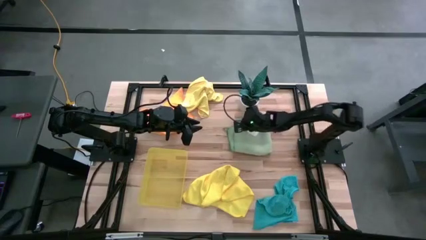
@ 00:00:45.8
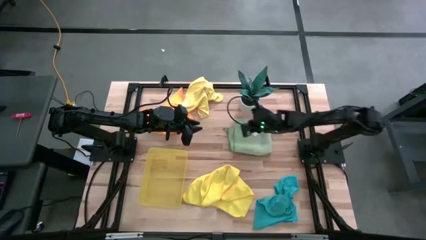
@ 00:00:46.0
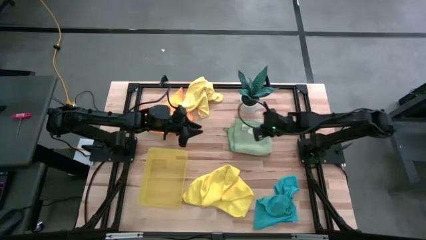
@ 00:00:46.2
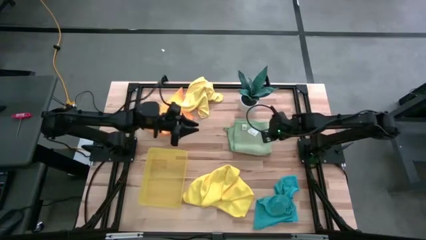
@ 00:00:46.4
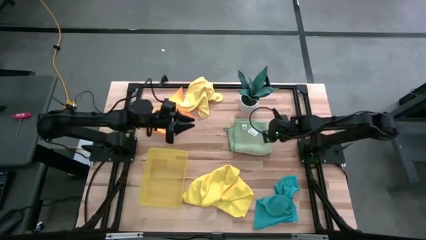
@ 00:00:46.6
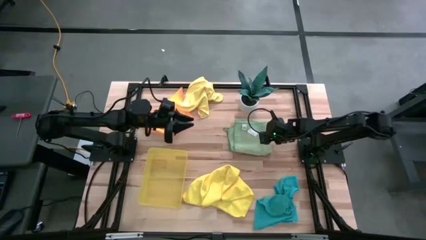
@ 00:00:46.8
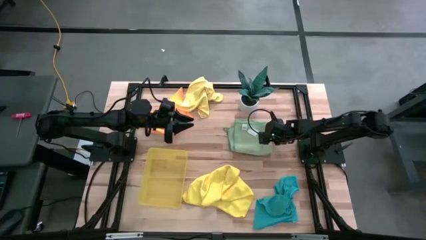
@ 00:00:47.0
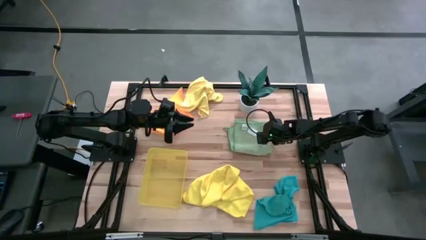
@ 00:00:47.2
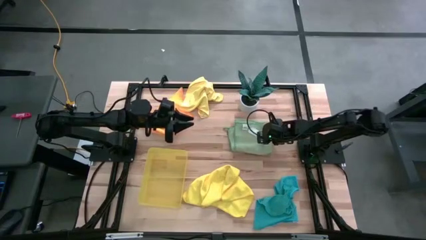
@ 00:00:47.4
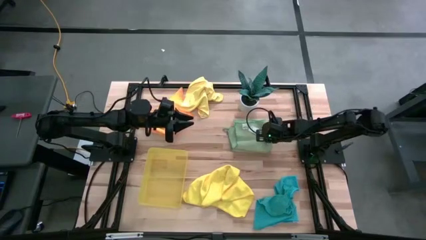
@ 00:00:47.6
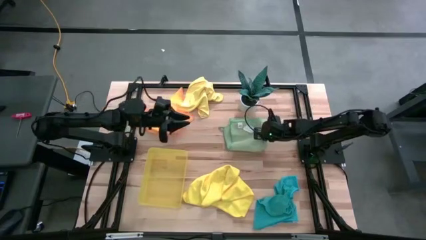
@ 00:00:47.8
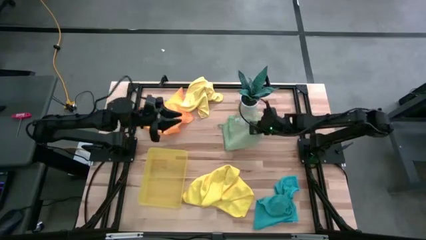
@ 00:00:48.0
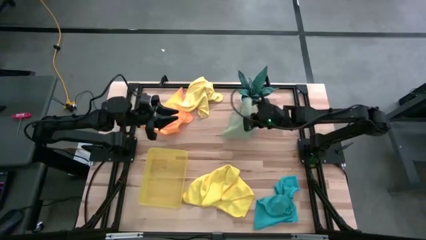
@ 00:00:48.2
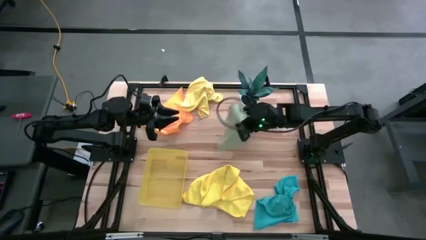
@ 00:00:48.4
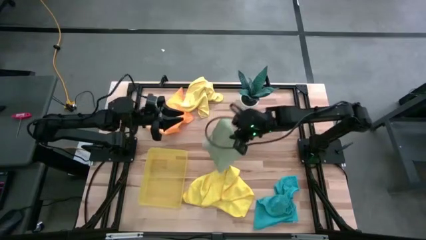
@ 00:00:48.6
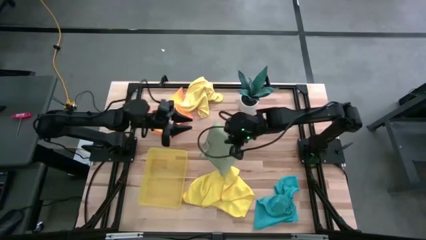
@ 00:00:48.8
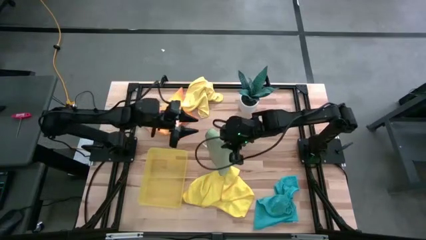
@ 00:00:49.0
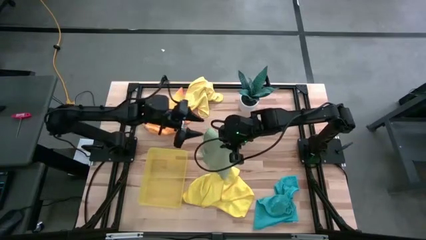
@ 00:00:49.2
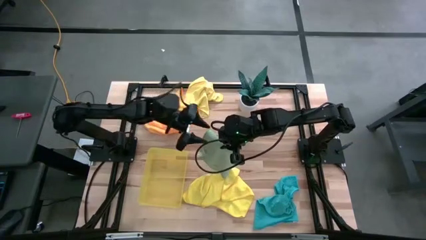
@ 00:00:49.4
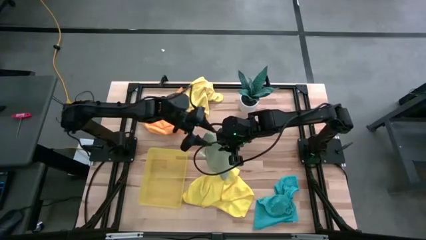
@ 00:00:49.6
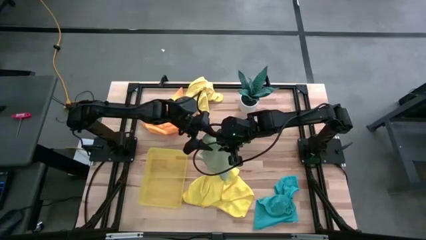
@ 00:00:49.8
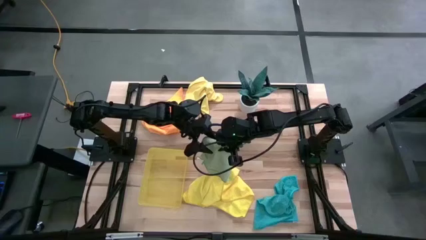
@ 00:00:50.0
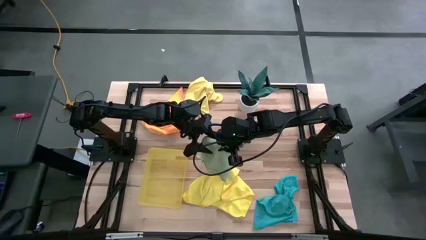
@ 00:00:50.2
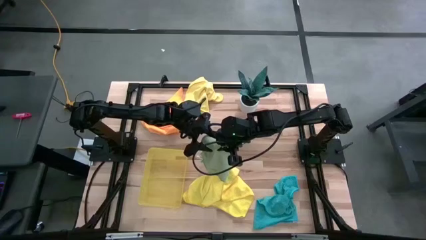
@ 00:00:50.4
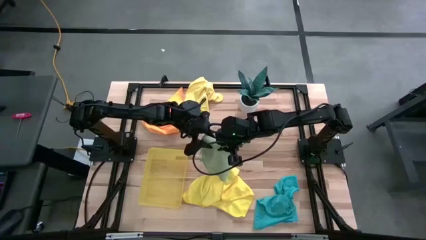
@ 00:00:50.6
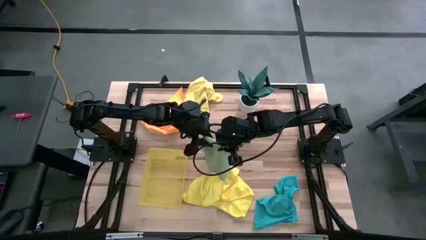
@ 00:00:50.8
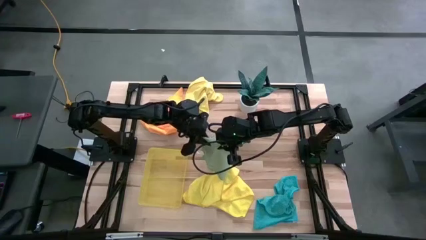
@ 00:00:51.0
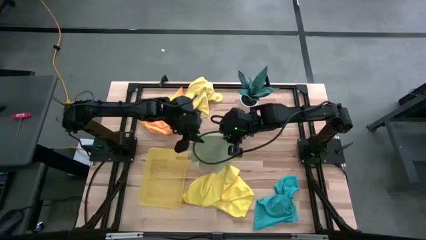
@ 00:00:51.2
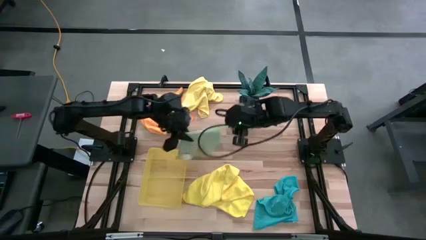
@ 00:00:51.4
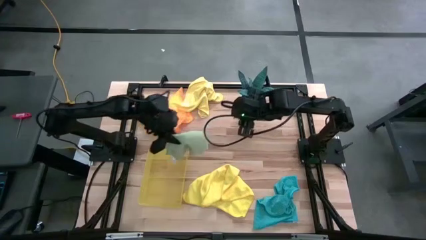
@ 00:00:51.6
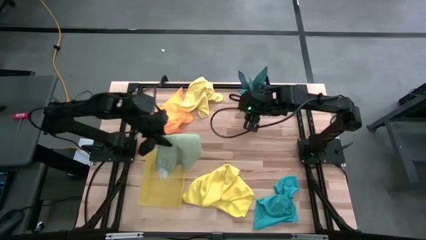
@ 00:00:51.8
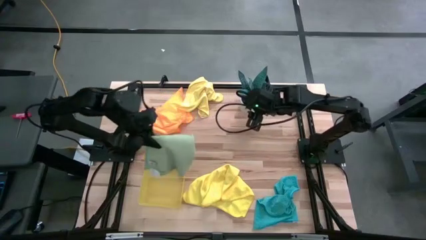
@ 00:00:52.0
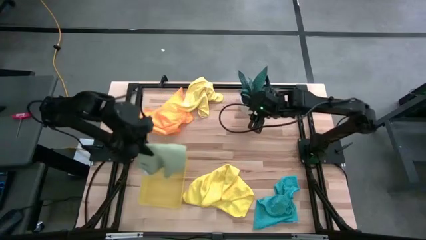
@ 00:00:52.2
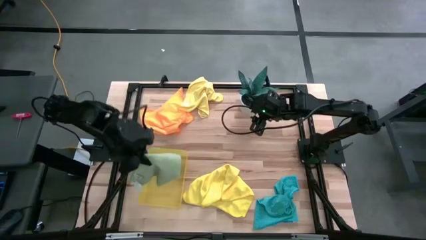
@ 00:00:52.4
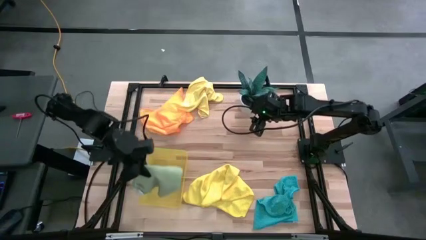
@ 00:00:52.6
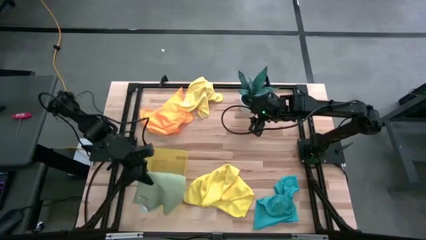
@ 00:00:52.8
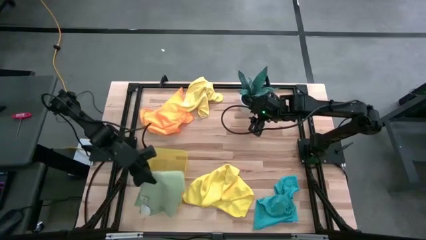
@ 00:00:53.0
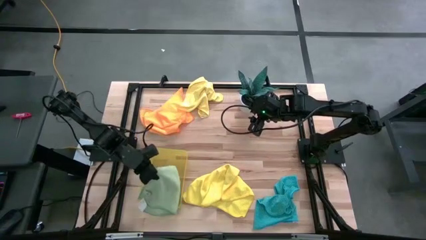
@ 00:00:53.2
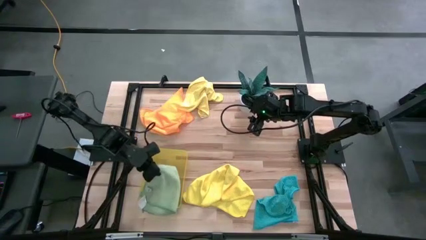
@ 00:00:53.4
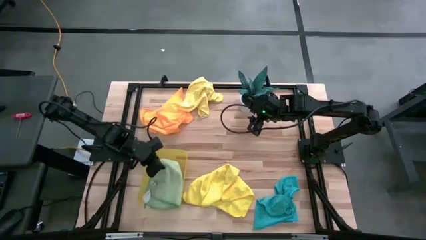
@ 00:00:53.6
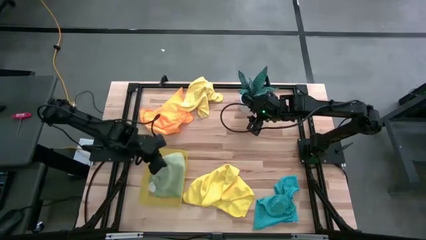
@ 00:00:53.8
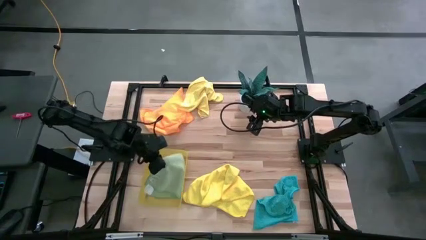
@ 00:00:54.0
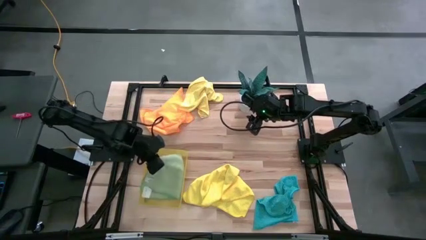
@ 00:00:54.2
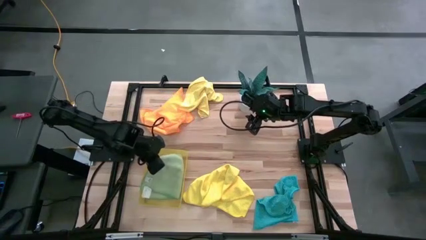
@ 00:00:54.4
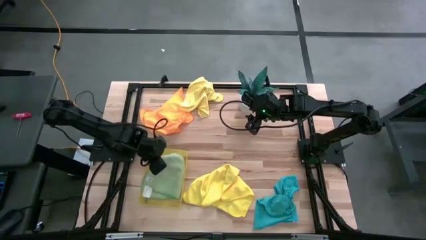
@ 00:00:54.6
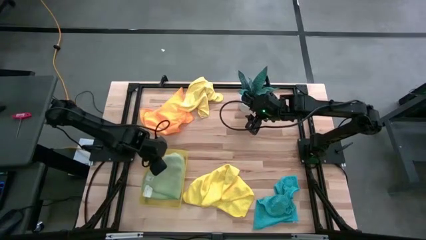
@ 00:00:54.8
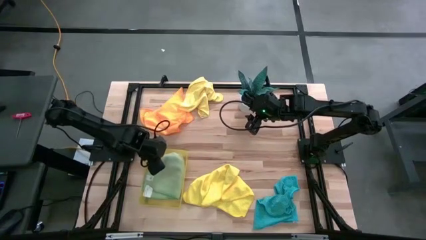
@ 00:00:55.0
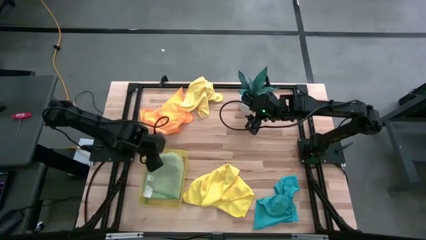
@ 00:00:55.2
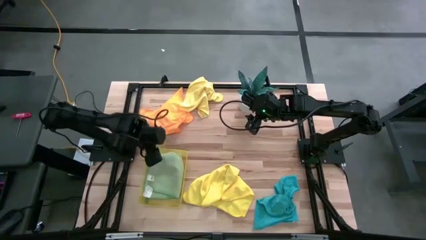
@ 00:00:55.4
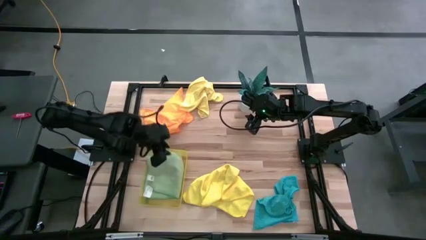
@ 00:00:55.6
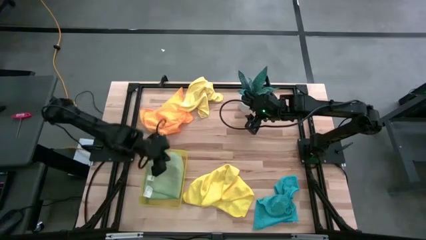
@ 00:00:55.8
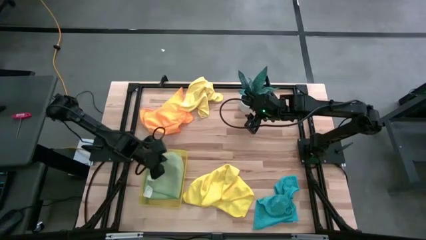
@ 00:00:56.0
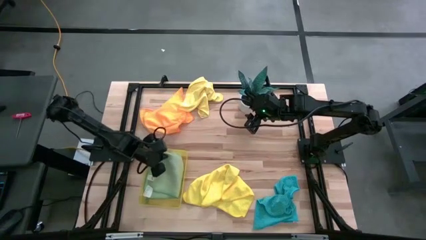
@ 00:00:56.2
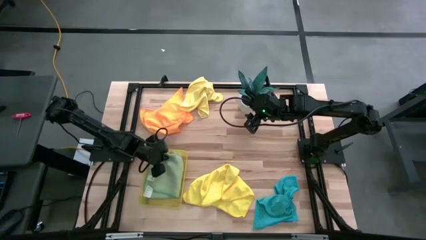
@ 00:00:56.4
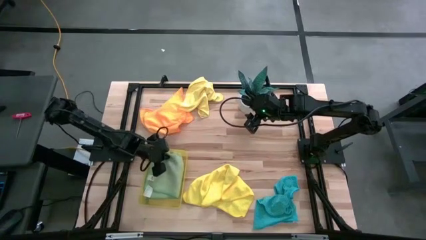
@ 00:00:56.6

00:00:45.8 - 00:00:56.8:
Task: Fold microfiber towels
Put the green microfiber cloth into the yellow bin
